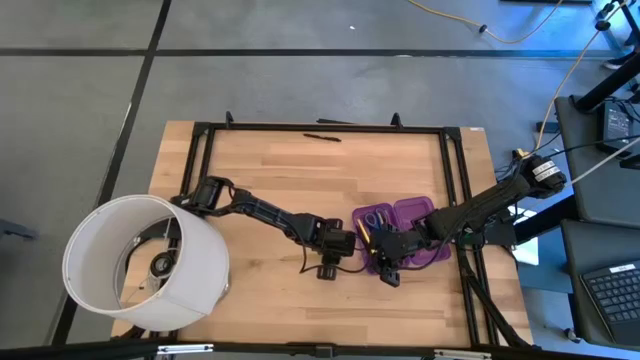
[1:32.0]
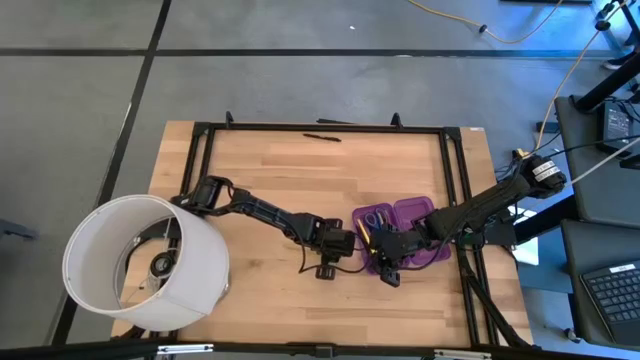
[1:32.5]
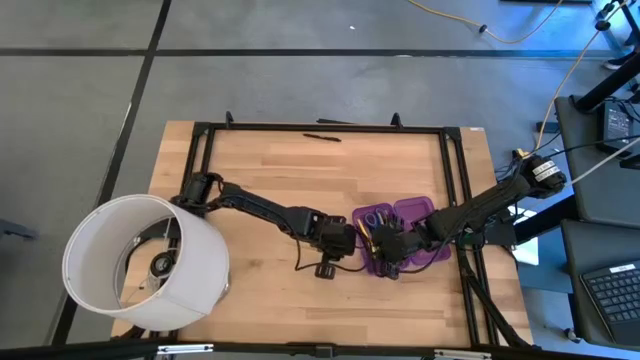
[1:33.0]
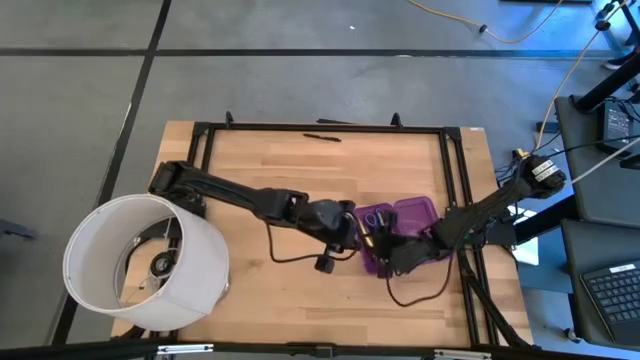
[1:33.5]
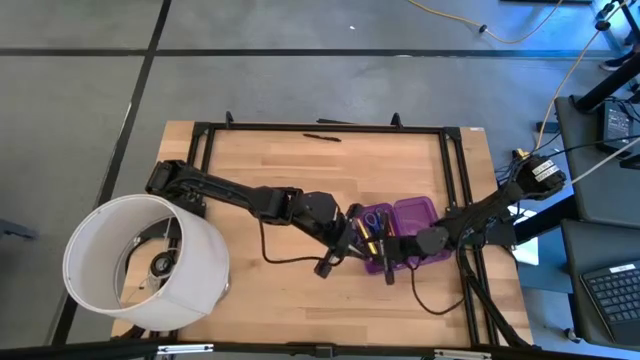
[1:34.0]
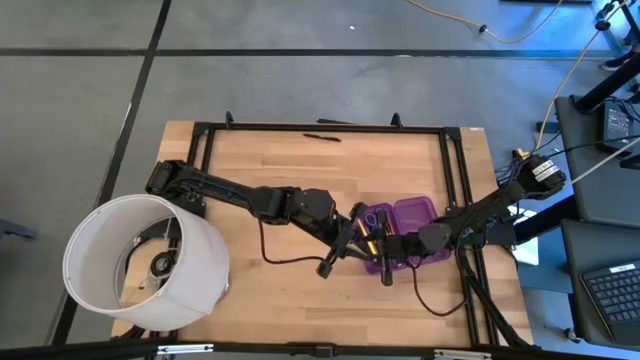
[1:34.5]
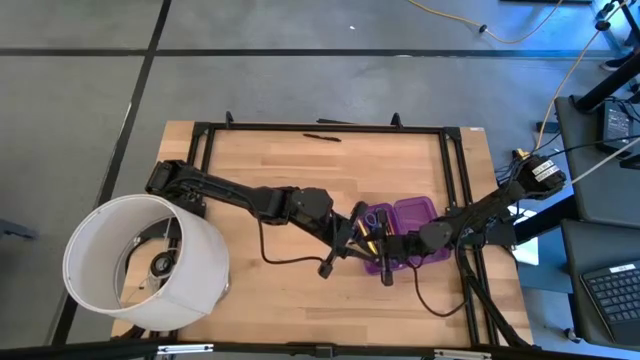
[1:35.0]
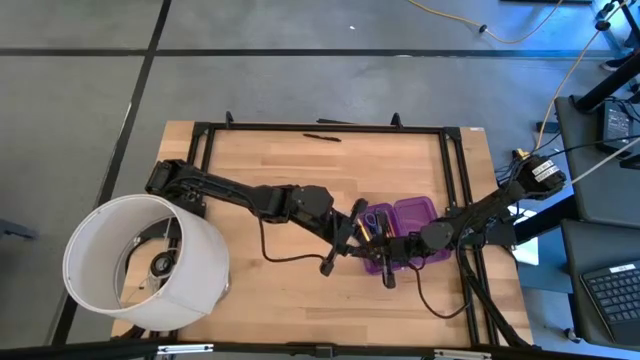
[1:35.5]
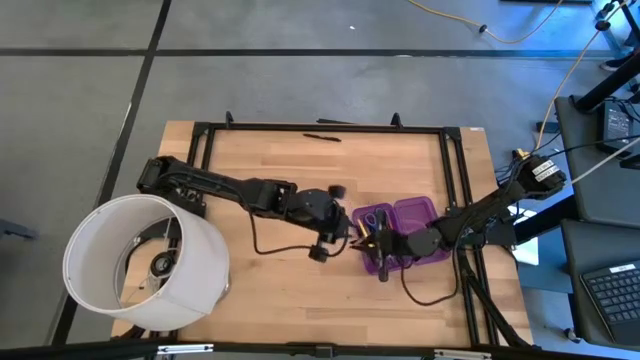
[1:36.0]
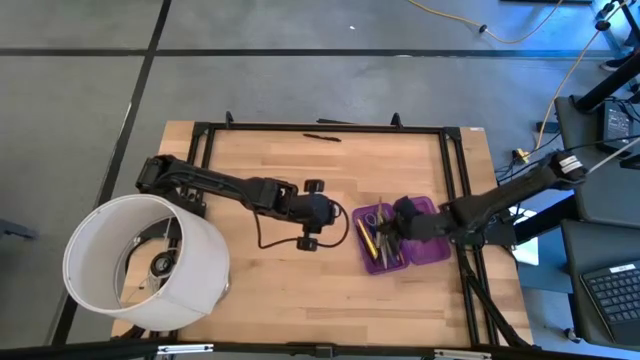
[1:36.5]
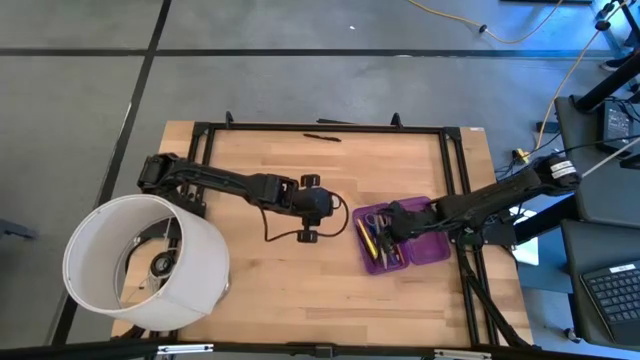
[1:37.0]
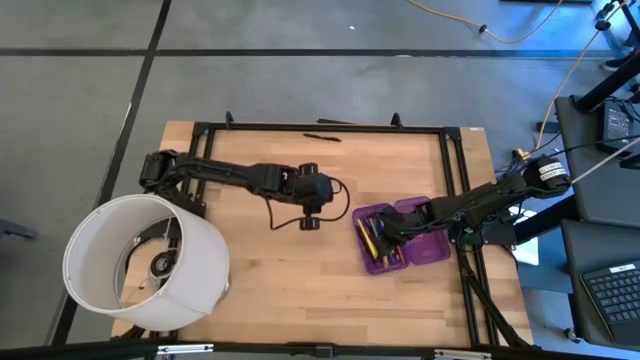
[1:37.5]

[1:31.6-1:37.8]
Task: Pick & place school supplies into a supply box
Put the pencil into the supply box

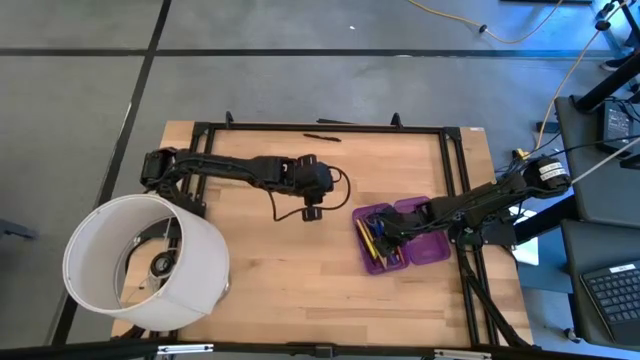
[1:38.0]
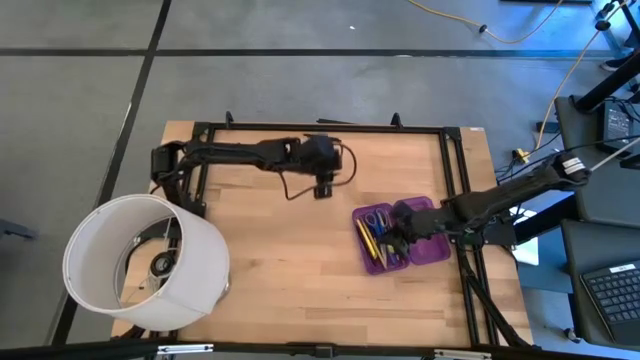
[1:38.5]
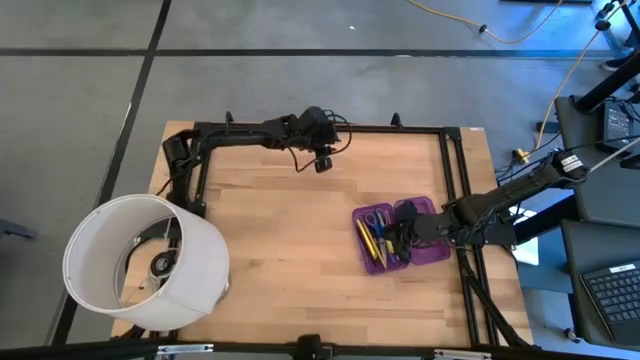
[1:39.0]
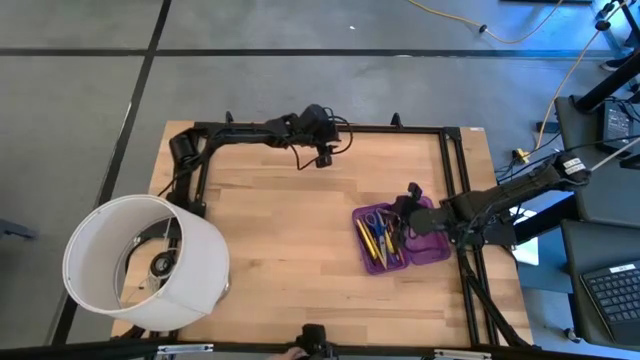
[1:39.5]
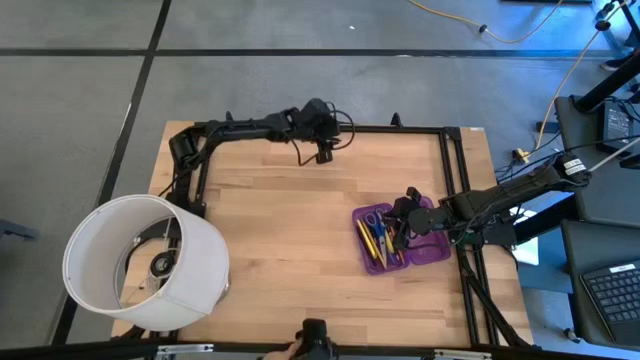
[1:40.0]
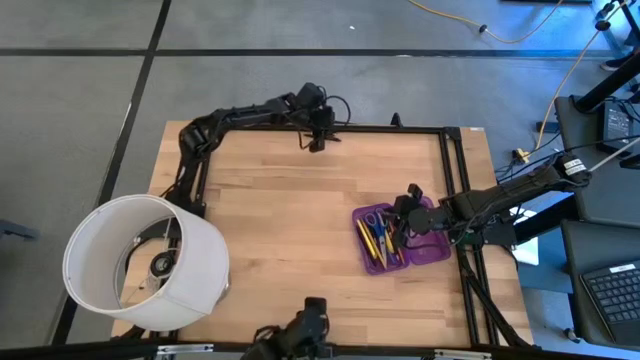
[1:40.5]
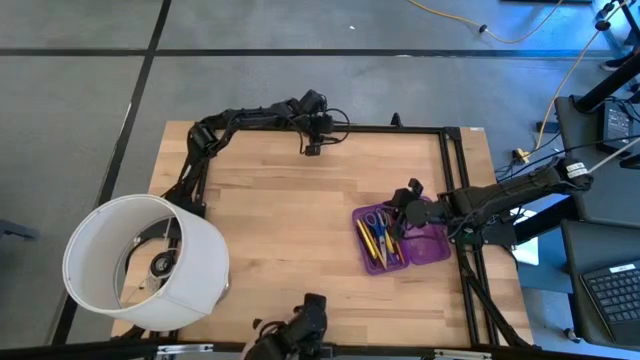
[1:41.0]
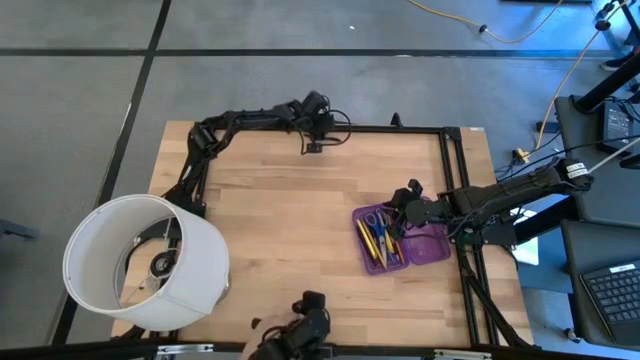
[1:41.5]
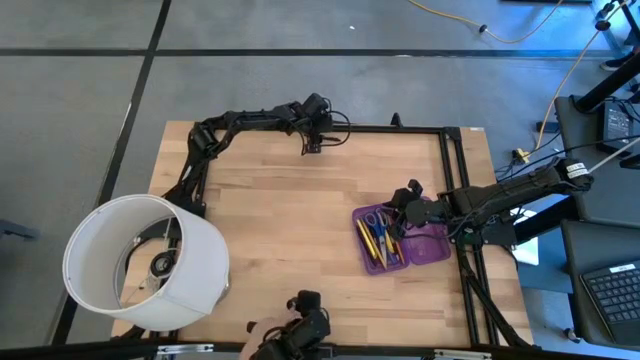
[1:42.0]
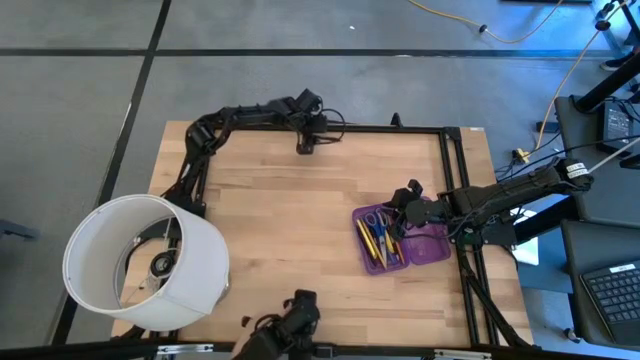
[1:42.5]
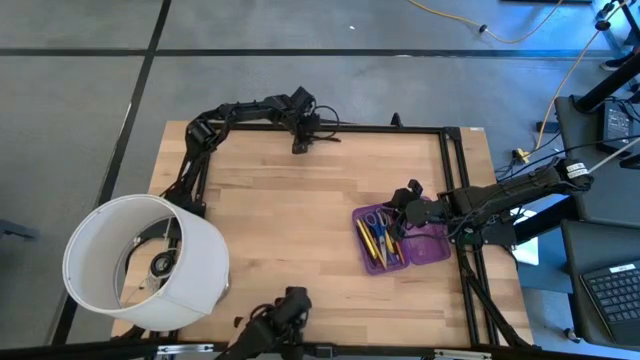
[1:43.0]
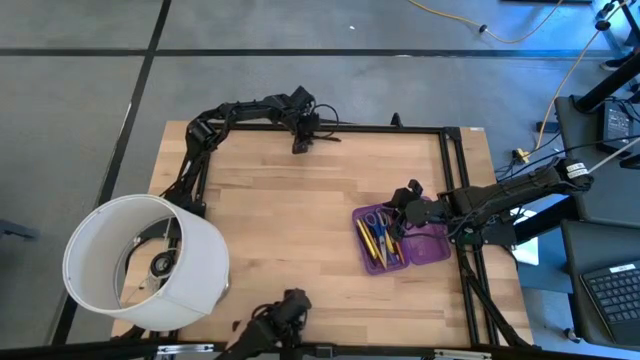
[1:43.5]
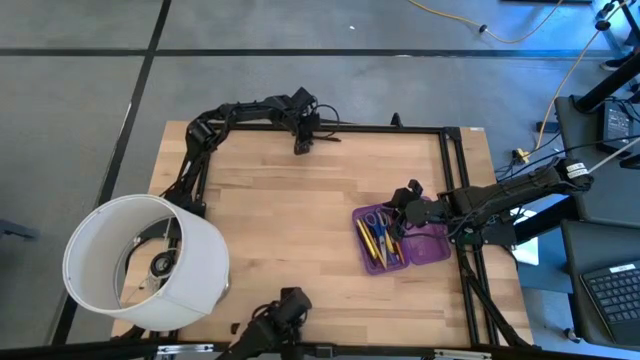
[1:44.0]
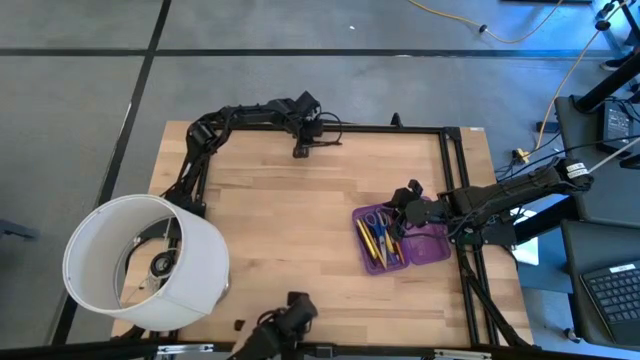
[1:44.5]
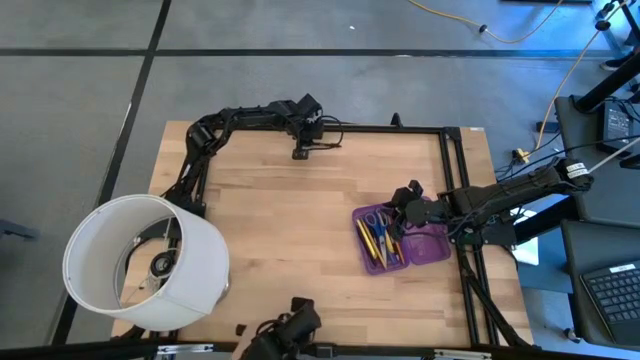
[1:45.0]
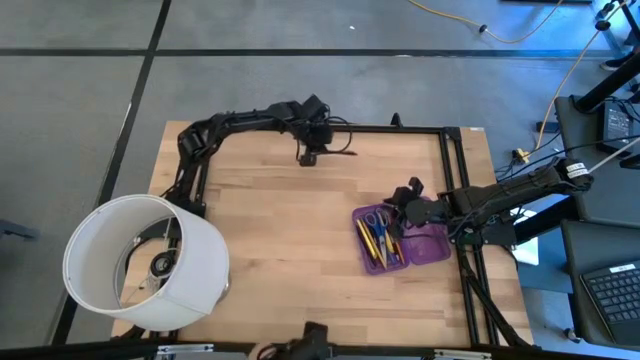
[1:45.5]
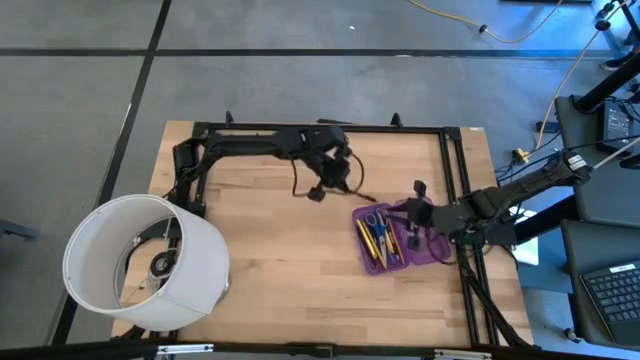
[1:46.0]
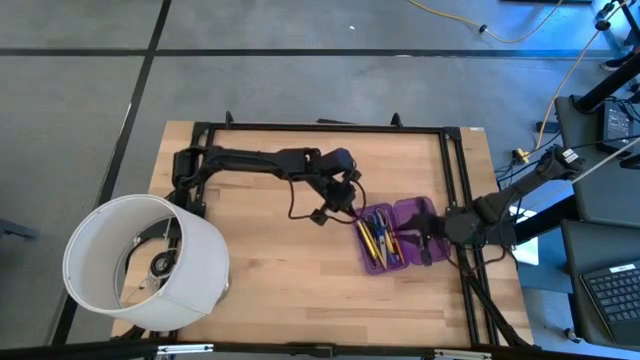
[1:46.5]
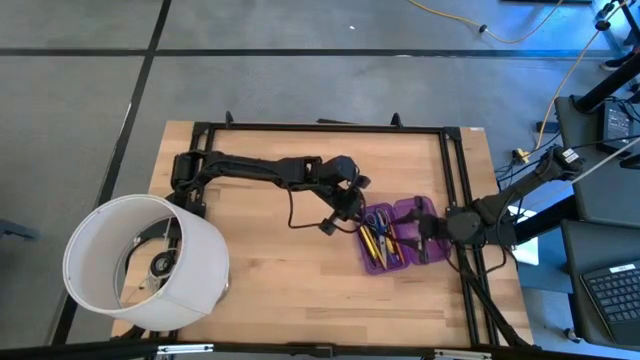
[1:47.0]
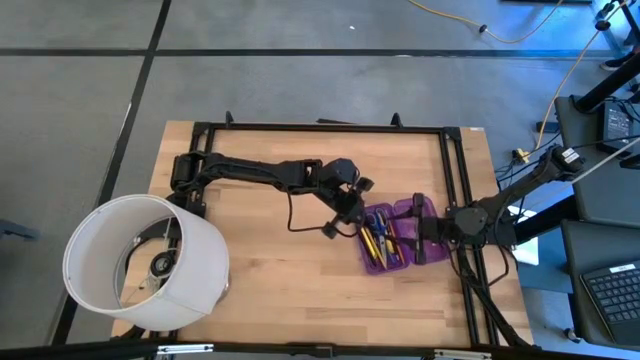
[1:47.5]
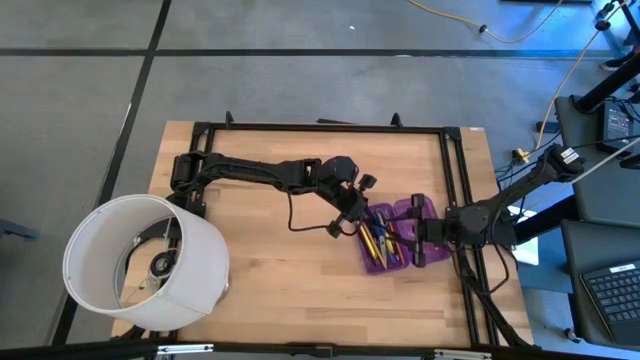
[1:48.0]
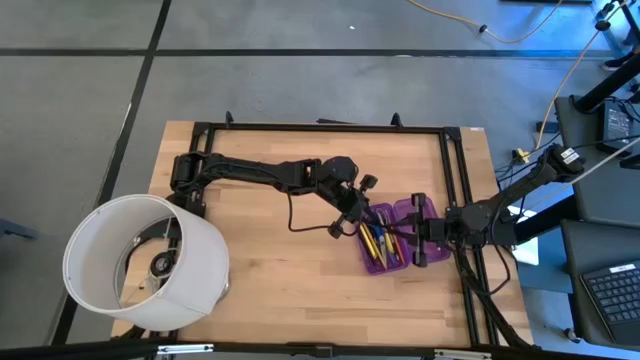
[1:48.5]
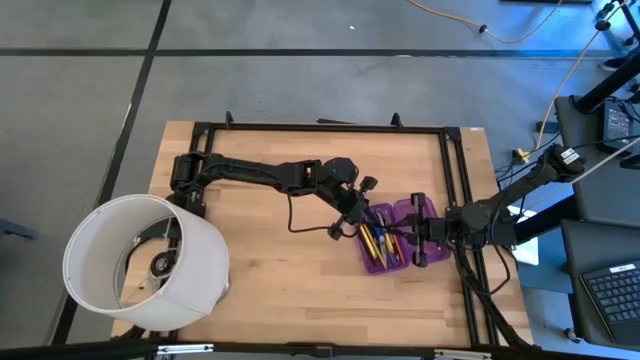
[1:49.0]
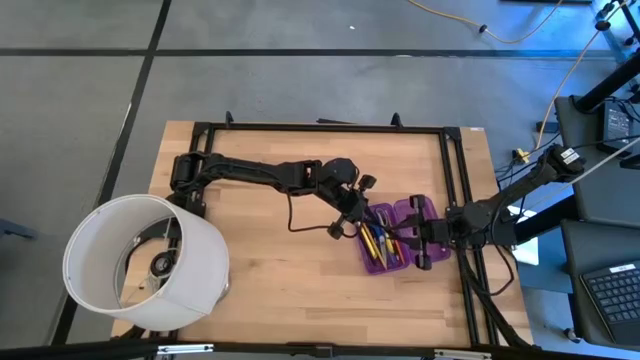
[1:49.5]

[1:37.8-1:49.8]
Put the pen into the supply box

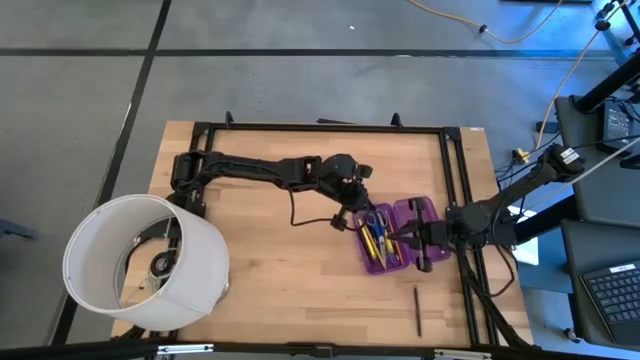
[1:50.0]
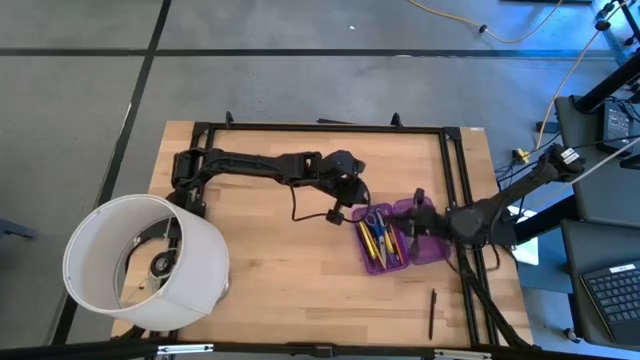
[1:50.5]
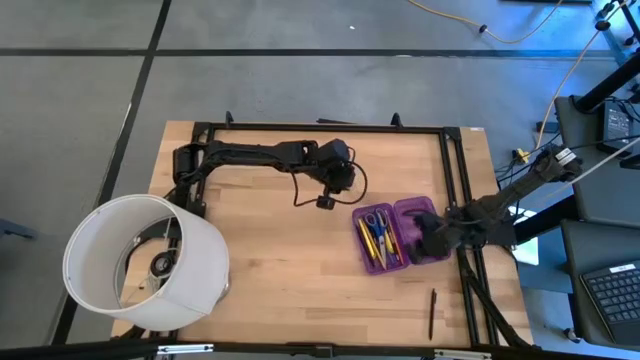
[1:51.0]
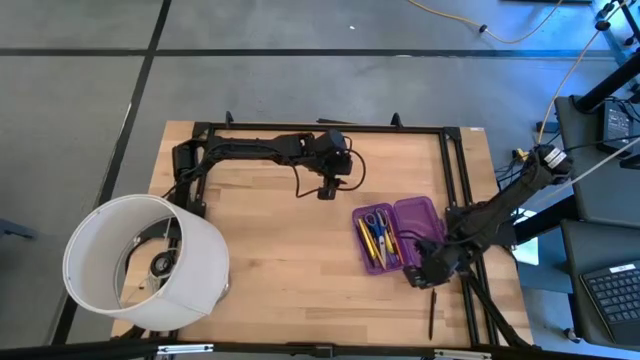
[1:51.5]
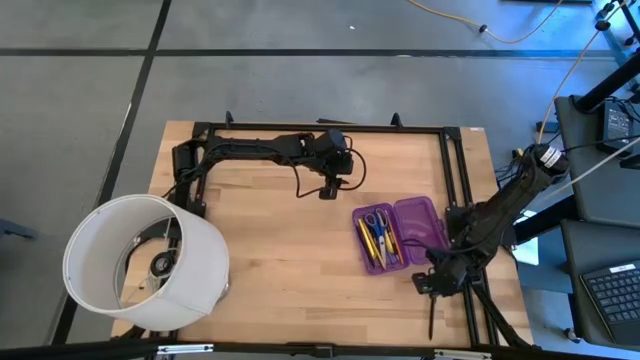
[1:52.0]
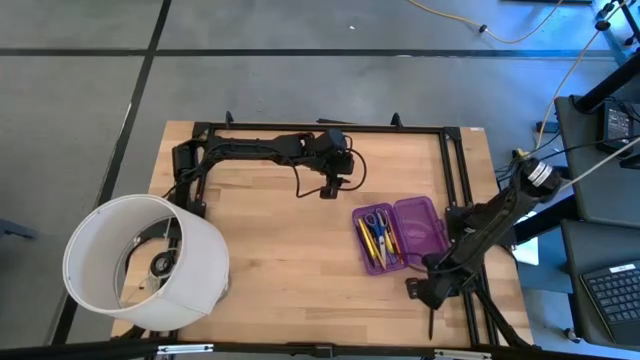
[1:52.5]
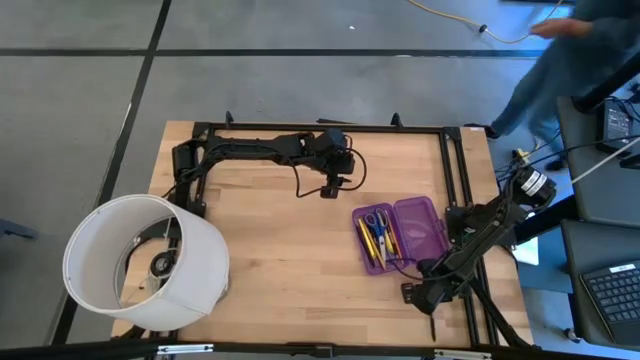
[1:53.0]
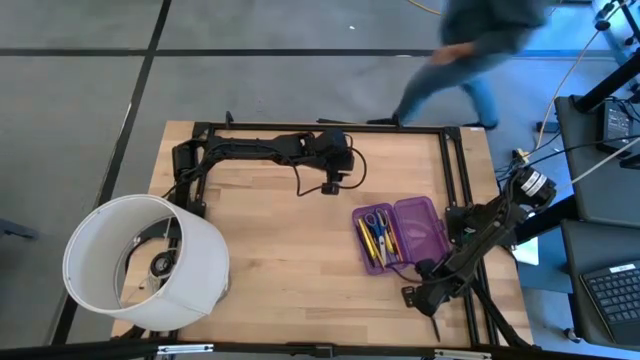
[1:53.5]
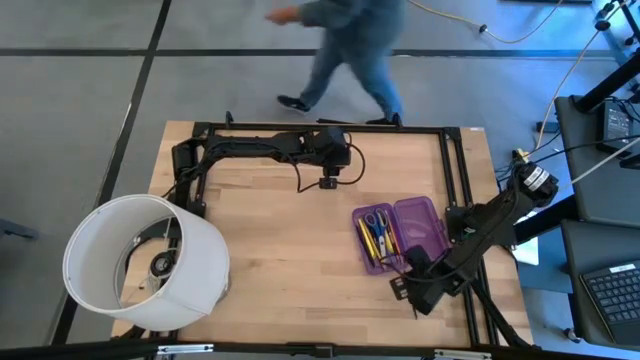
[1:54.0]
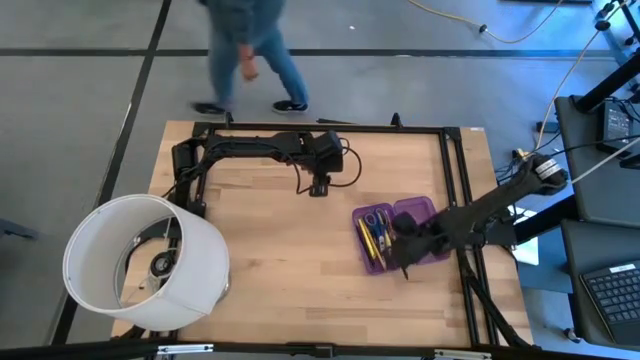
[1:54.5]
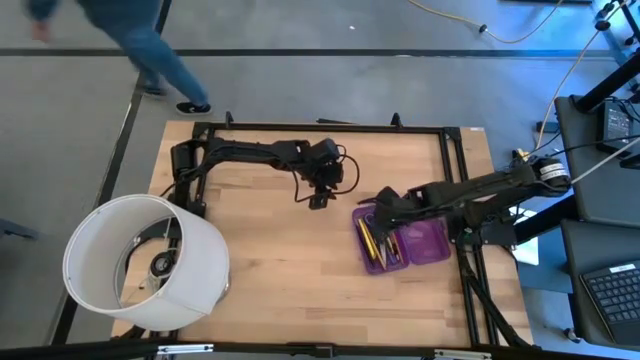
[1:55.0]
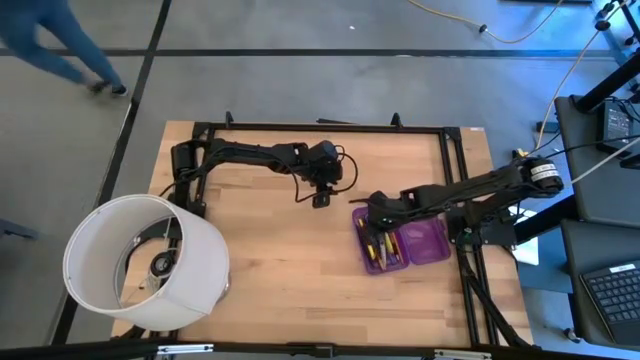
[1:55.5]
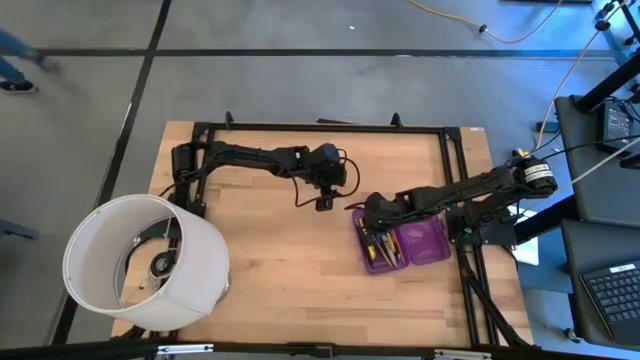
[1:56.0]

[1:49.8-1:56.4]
Put the pen into the supply box
